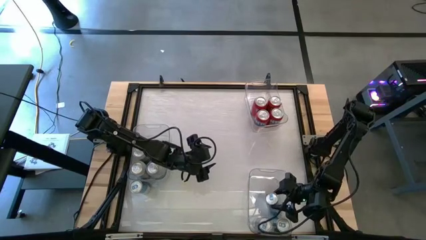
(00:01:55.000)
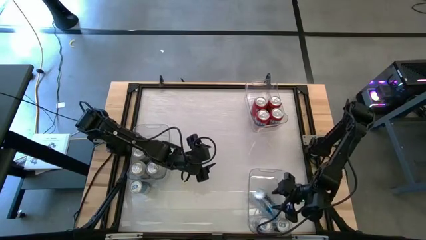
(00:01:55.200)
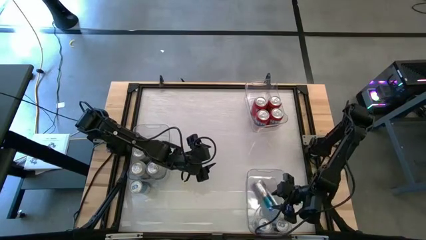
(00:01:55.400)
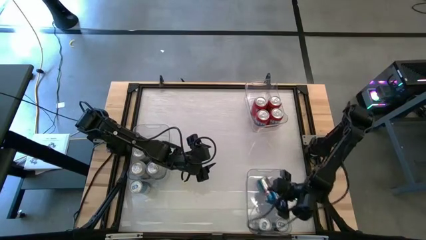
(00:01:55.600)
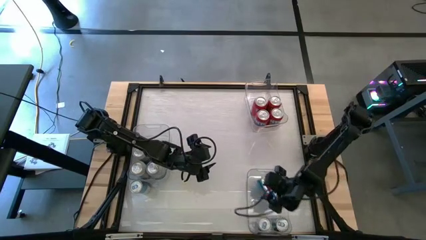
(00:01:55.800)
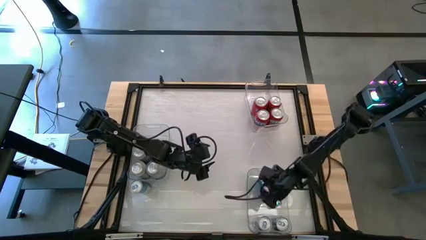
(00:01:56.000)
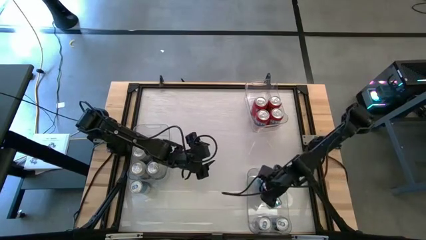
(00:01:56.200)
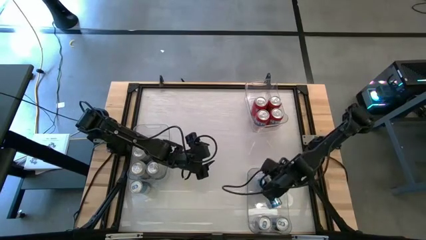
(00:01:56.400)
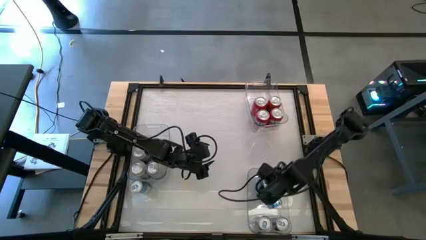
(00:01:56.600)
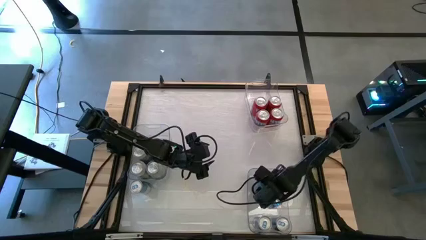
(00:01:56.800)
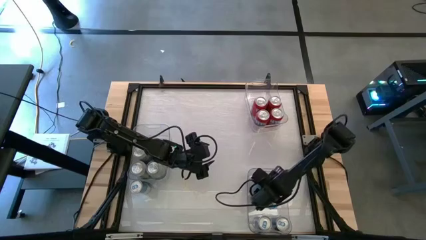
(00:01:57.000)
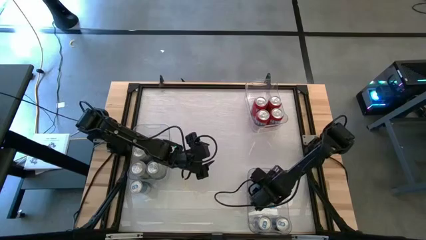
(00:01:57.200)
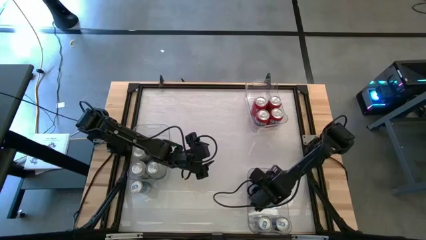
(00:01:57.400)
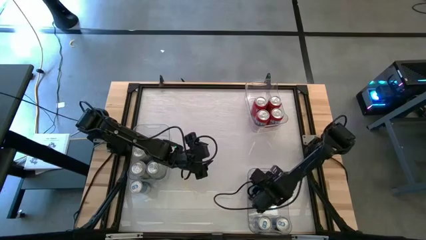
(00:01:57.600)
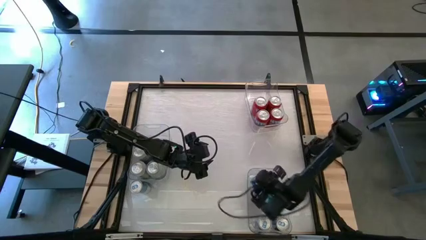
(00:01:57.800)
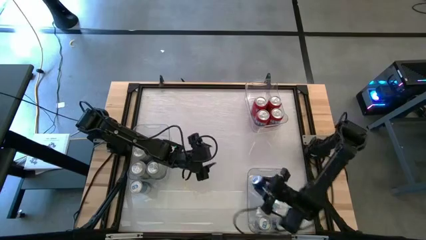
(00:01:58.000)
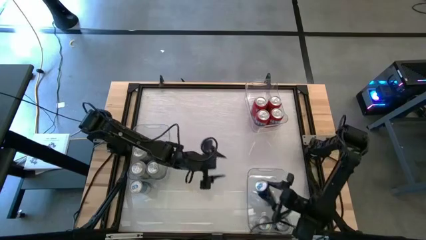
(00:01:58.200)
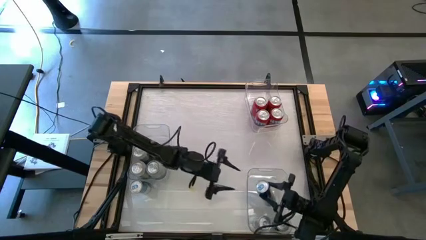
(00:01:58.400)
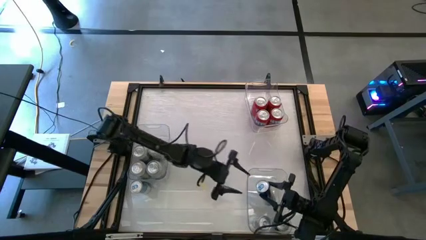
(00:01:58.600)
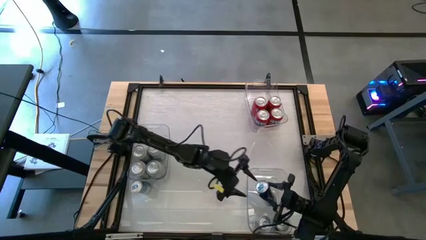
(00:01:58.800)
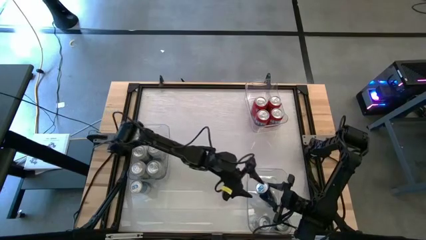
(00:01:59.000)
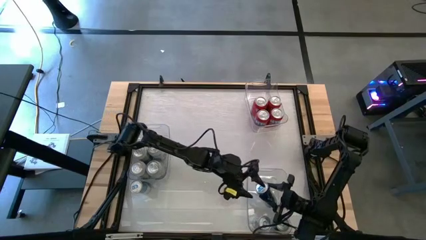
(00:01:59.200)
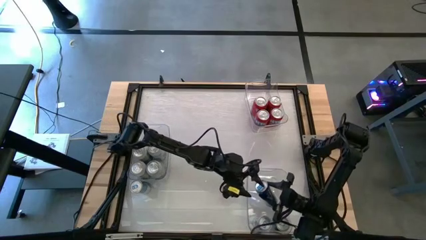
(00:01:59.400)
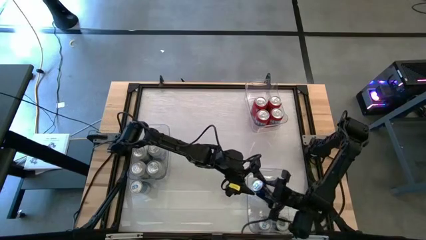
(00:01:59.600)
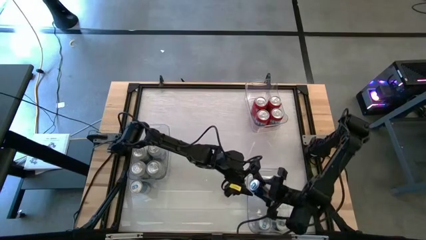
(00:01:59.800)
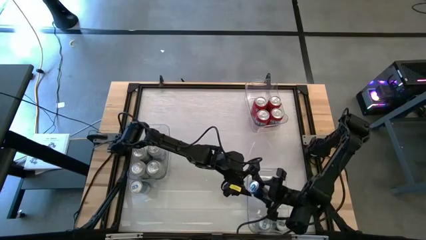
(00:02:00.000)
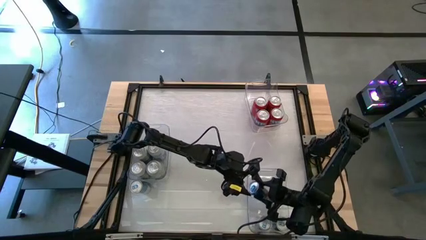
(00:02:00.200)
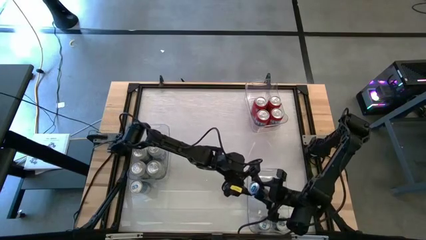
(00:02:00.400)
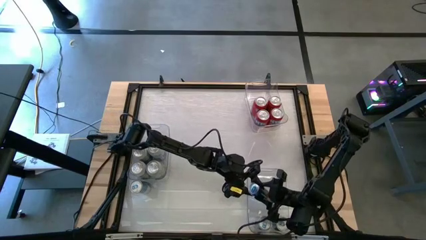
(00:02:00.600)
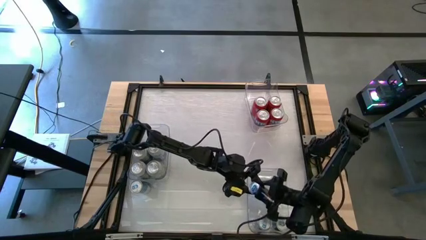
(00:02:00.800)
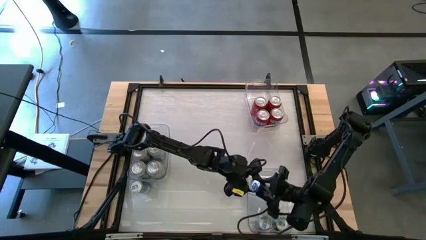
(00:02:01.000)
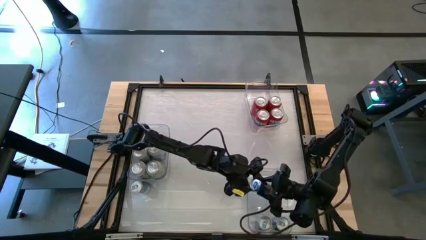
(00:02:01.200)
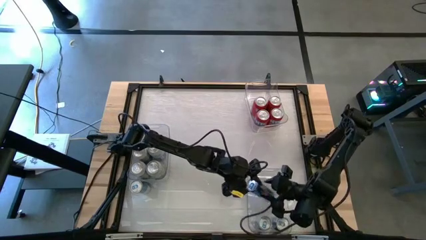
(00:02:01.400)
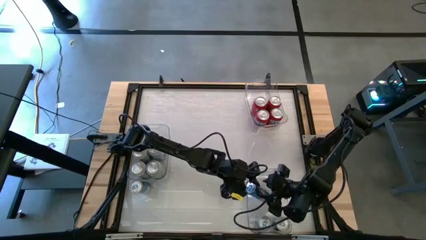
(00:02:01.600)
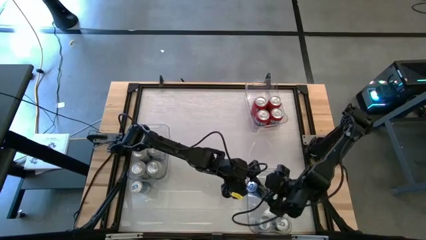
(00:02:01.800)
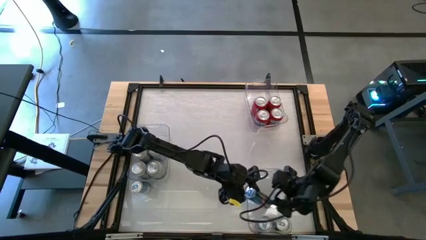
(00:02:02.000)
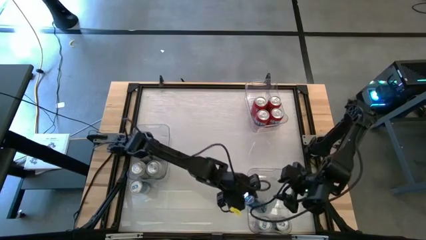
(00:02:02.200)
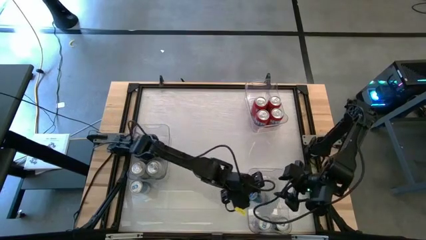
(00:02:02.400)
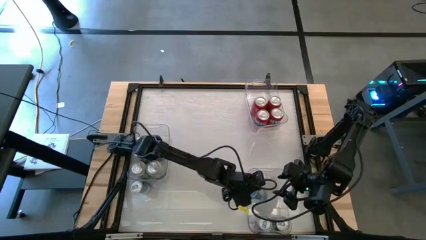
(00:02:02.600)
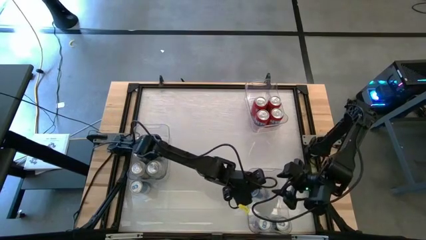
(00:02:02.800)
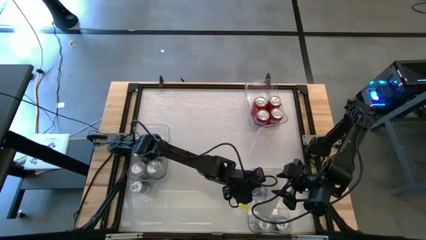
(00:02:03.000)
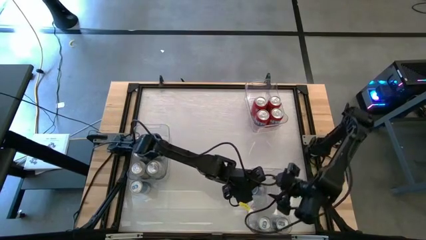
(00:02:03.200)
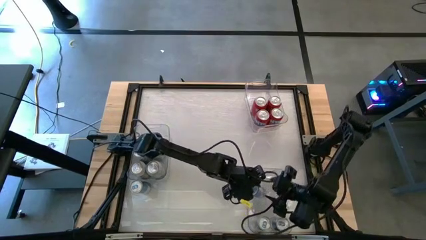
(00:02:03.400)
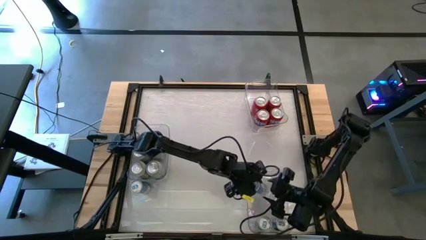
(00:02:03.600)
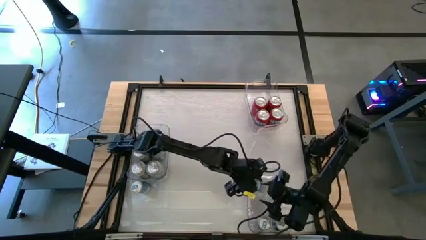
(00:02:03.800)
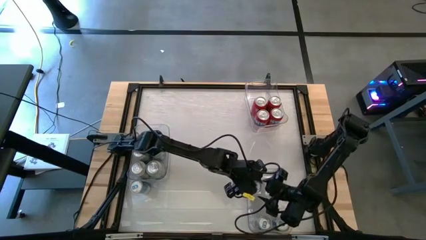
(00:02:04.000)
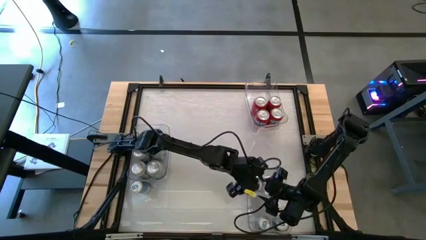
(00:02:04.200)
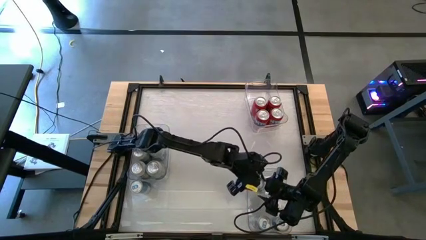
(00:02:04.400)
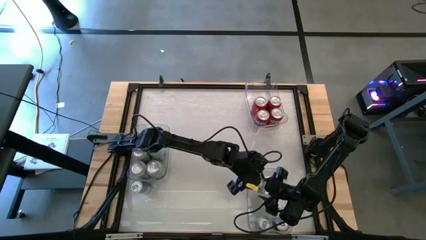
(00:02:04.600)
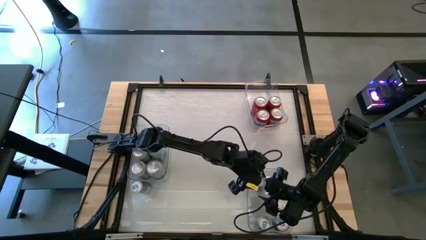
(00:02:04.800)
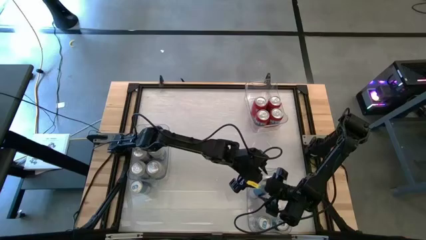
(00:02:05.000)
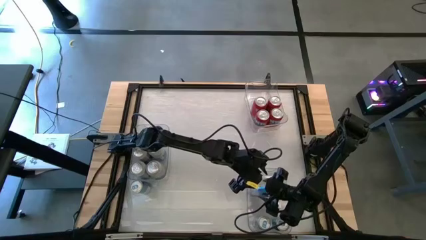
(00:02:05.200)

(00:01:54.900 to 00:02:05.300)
Task: Sort soda cans
Put the top blue soda can into the bottom right transparent bin

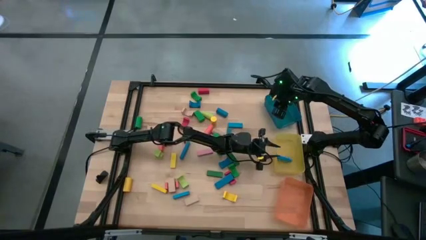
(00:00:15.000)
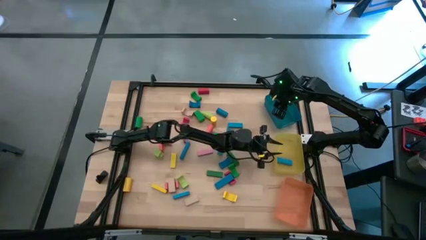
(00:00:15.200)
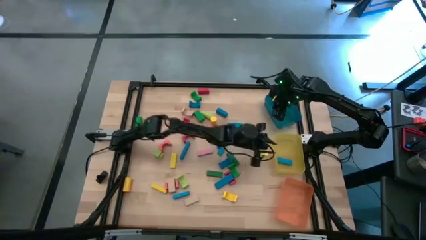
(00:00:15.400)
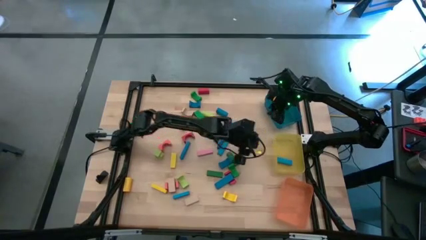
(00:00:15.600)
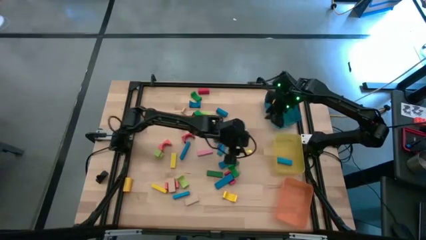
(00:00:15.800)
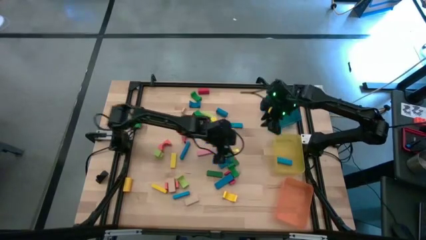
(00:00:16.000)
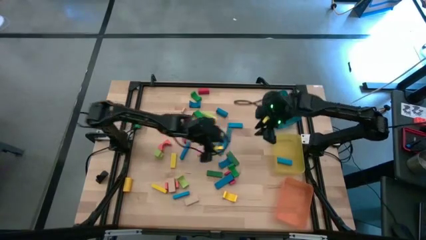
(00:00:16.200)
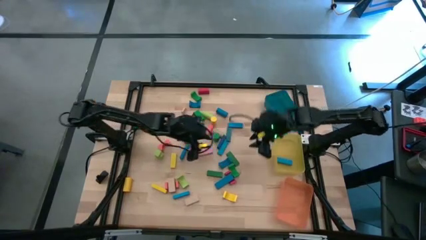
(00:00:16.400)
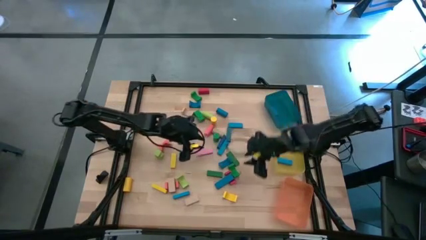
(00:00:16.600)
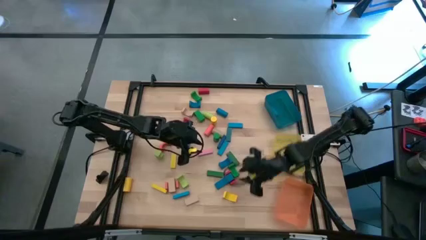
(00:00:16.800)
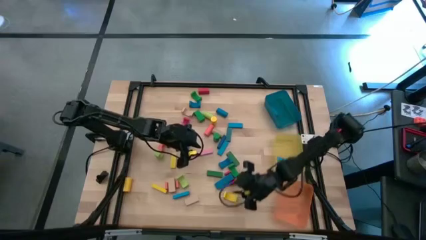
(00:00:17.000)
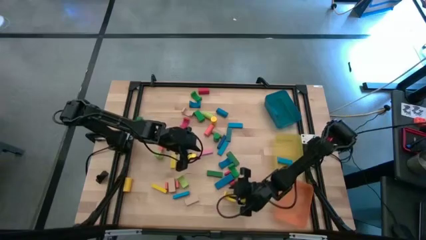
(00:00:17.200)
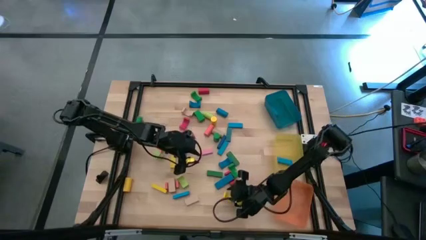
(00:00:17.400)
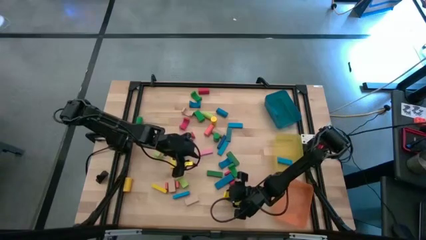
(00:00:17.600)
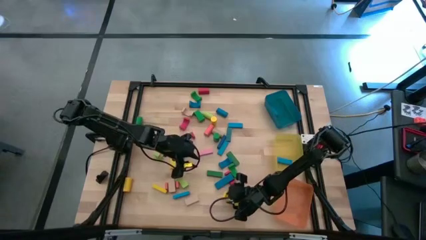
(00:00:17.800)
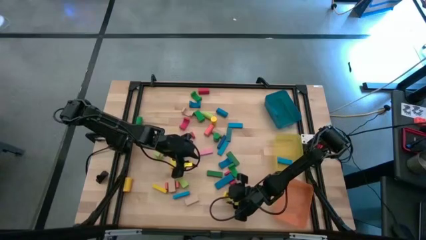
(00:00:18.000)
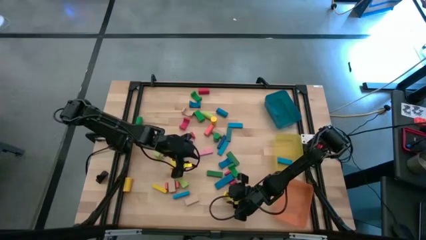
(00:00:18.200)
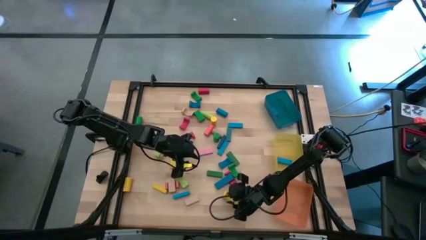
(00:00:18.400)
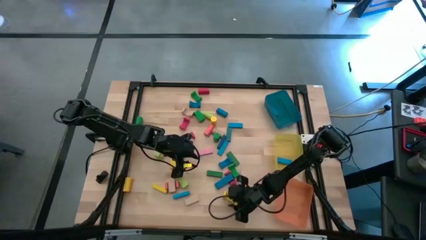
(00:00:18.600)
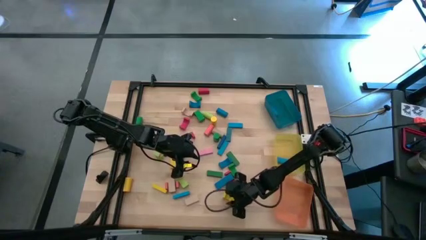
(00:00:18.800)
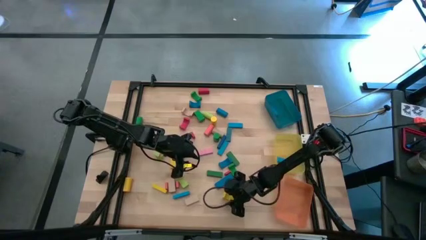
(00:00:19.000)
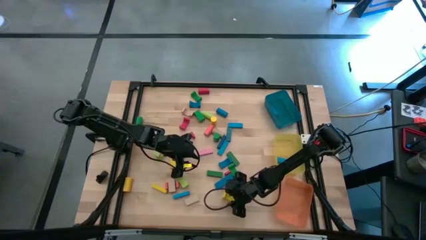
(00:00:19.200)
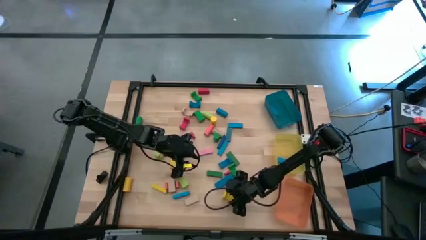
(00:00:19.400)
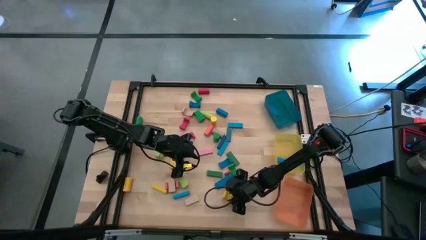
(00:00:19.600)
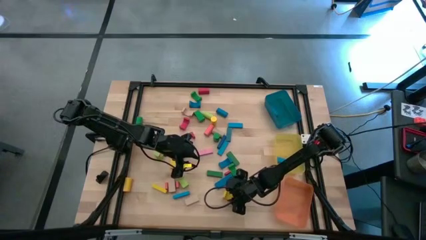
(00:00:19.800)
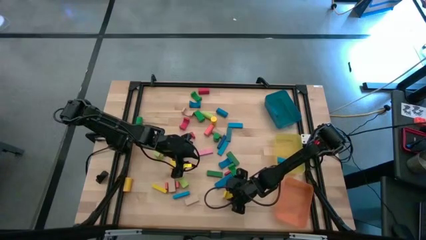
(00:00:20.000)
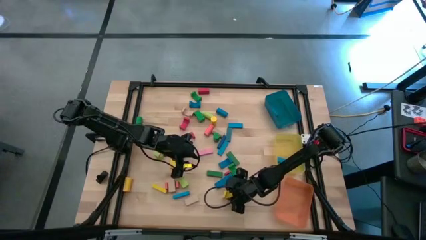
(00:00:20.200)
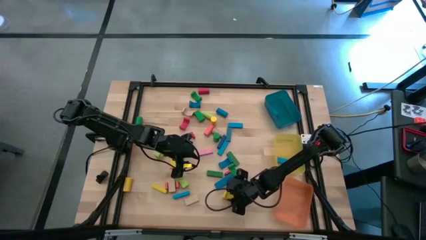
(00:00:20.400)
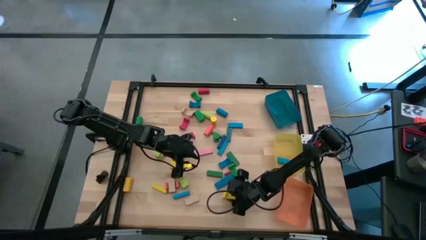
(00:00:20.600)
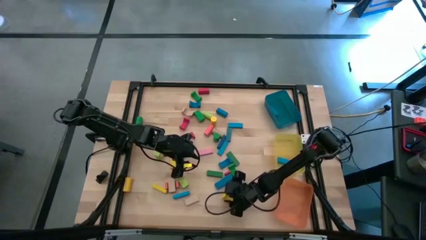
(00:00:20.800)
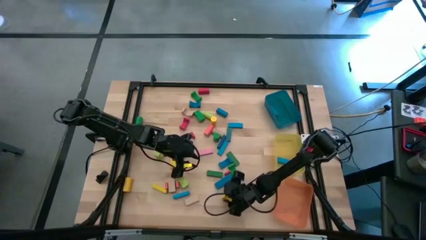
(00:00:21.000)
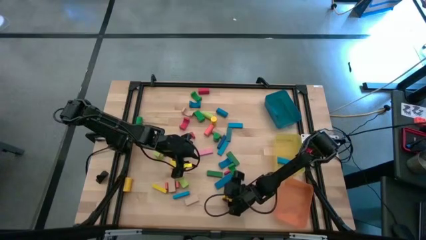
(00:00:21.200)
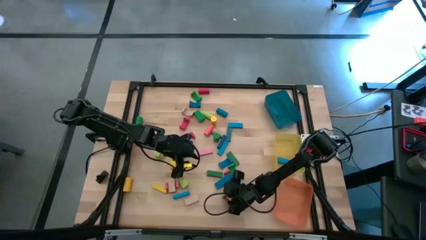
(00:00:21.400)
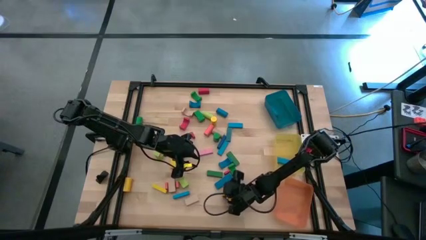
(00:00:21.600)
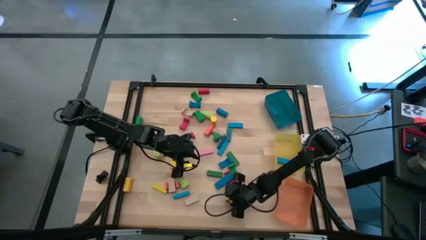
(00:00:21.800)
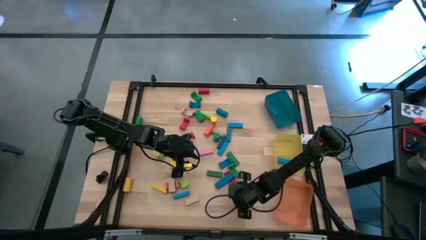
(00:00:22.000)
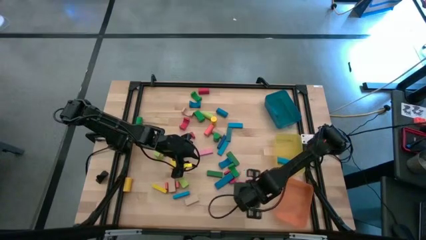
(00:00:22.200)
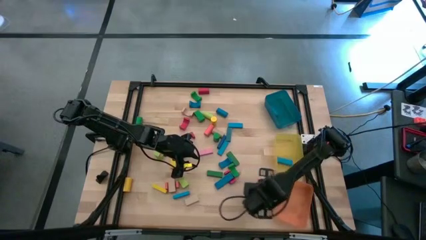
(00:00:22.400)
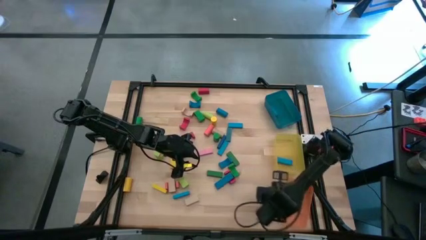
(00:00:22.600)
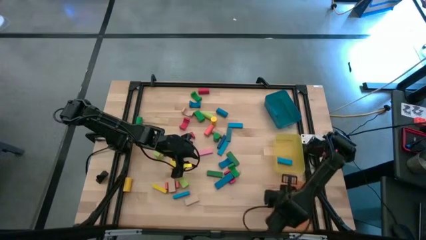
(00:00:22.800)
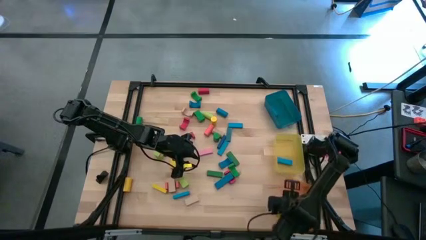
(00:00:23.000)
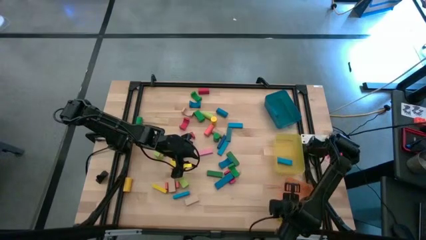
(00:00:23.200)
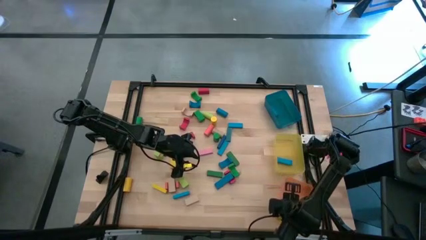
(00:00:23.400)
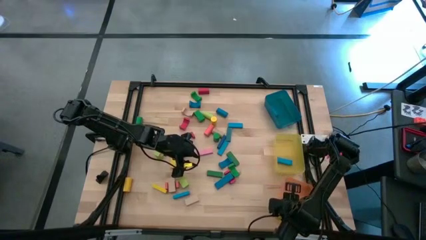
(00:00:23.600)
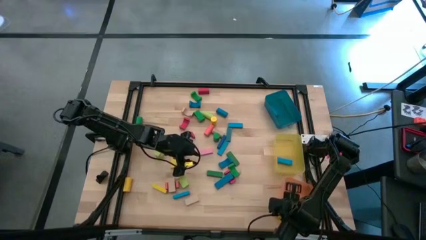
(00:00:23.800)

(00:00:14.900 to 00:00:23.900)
Task: Sort blocks by size
Put the yellow arch block into the orange bin
